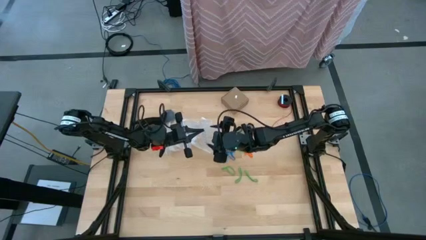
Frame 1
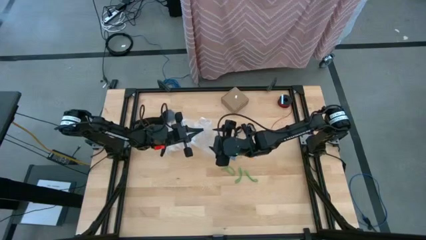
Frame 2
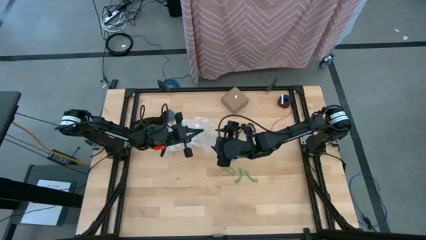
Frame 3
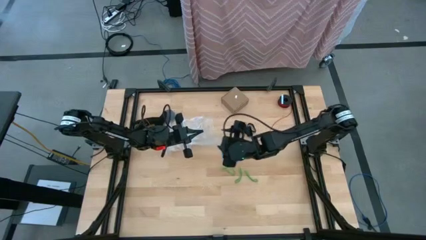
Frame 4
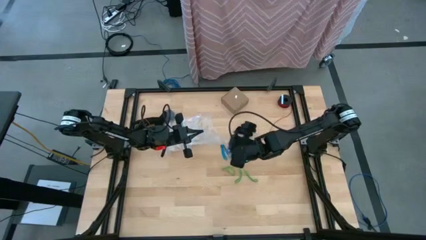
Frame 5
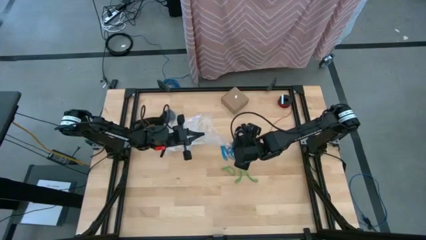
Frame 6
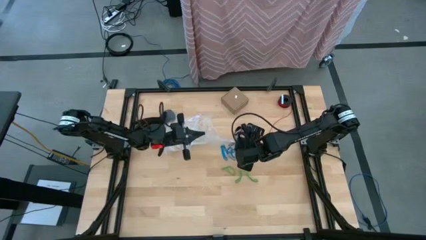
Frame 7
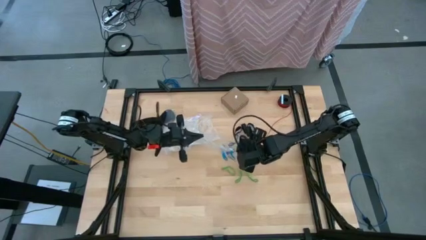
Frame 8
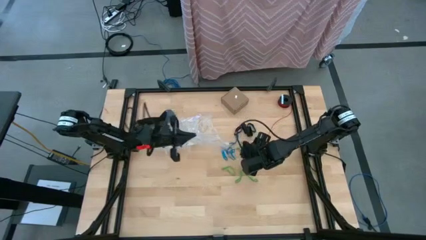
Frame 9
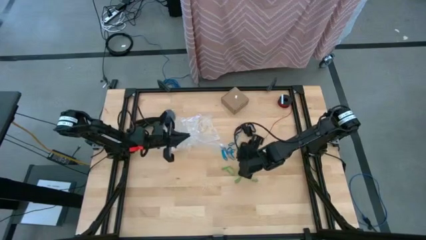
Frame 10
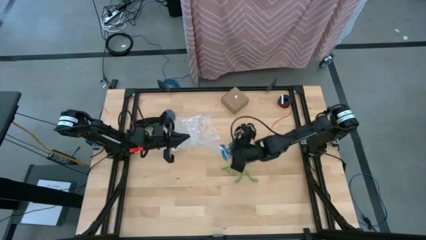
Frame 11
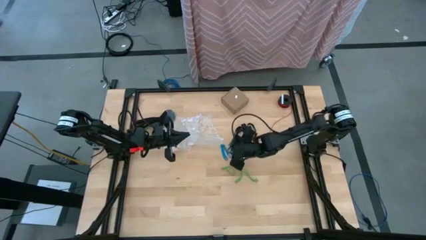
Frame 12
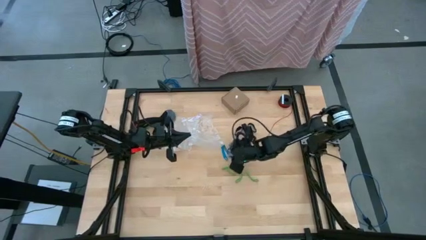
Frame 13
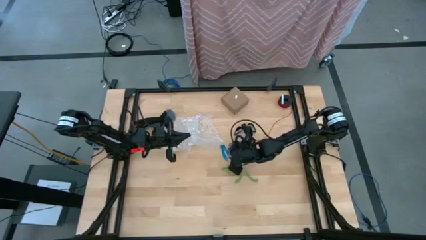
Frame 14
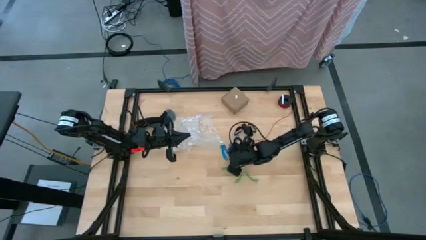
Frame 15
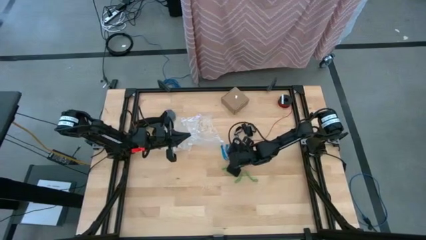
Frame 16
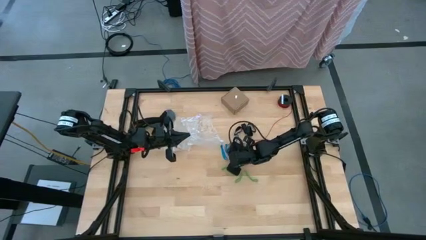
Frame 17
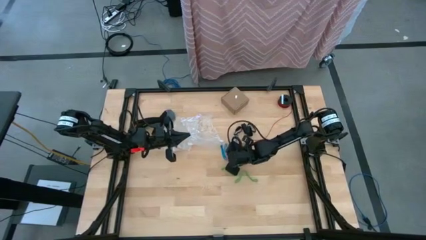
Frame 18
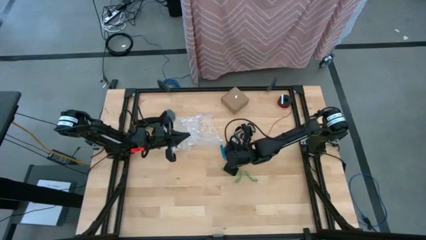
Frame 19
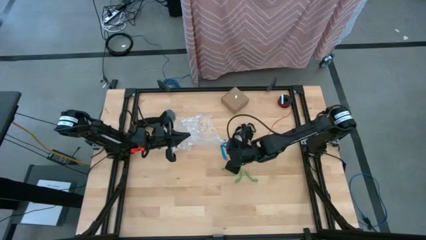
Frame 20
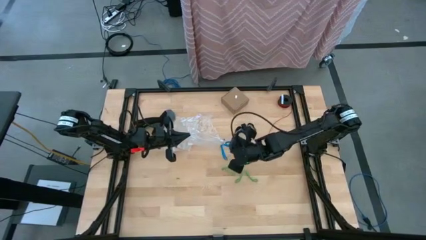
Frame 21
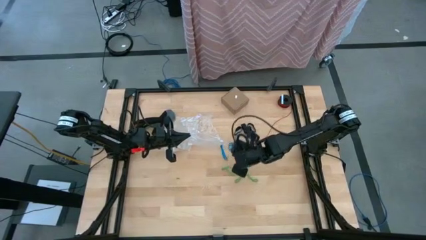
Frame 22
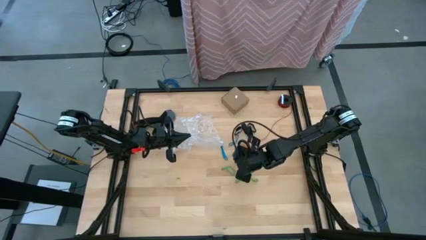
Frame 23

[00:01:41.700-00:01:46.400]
Task: Sort rubber bands
Put the blue rubber band into the transparent zip bag

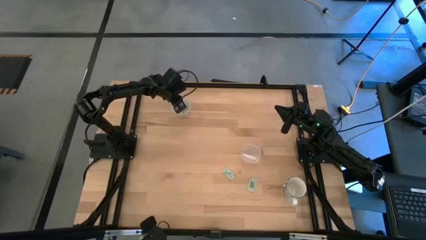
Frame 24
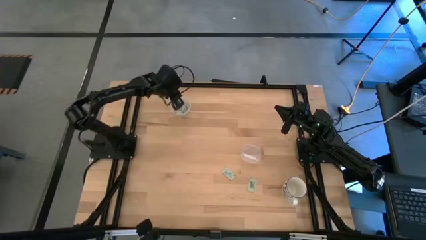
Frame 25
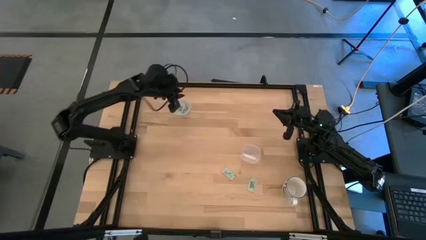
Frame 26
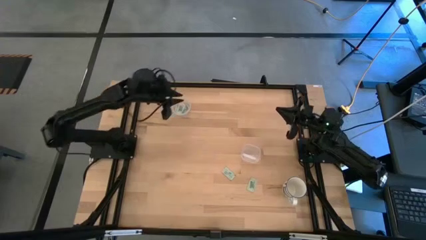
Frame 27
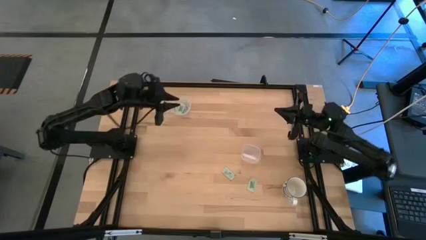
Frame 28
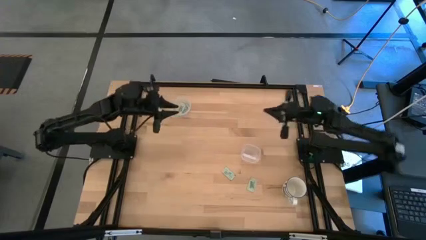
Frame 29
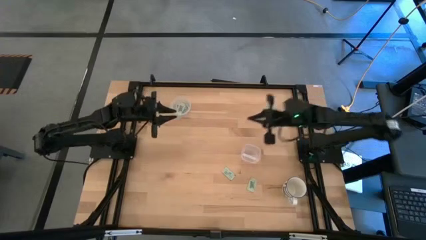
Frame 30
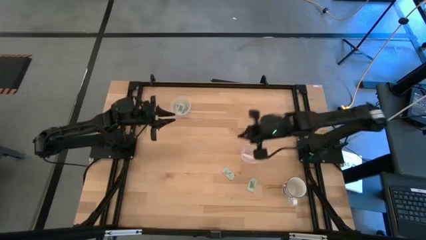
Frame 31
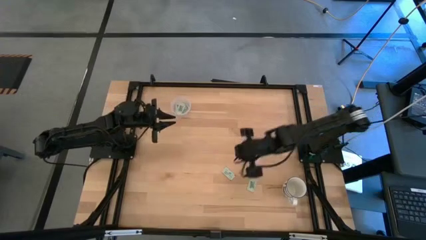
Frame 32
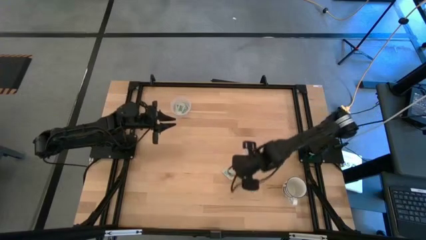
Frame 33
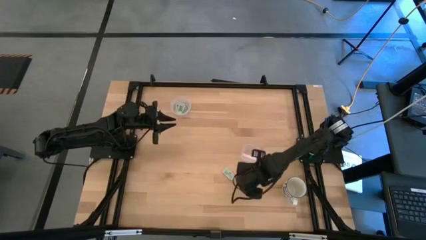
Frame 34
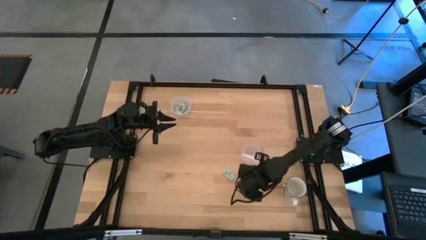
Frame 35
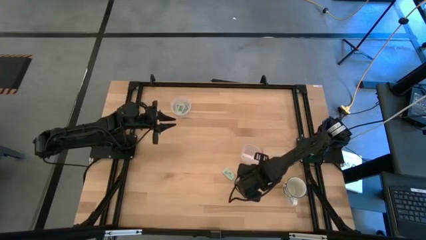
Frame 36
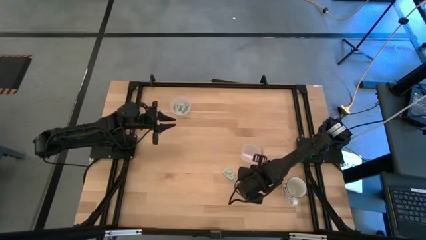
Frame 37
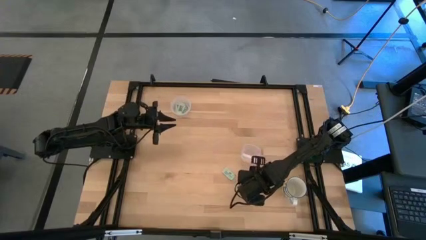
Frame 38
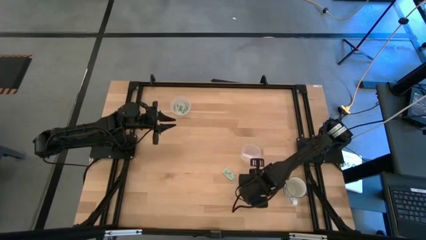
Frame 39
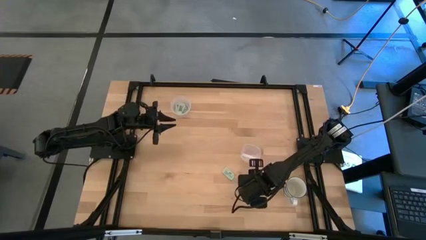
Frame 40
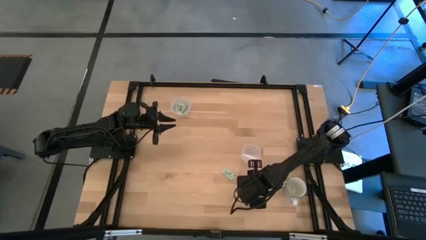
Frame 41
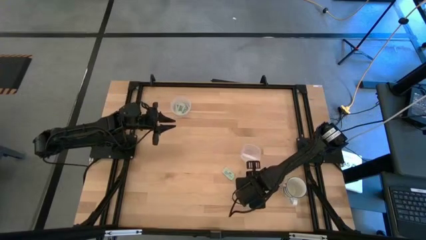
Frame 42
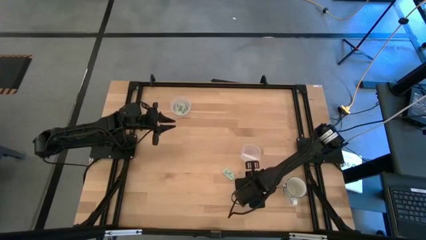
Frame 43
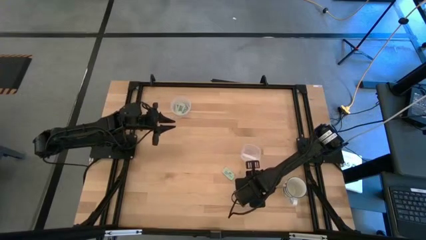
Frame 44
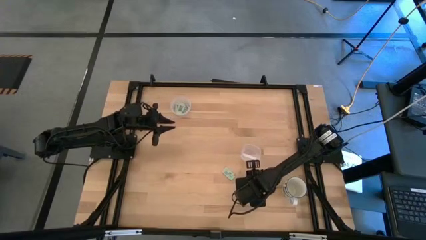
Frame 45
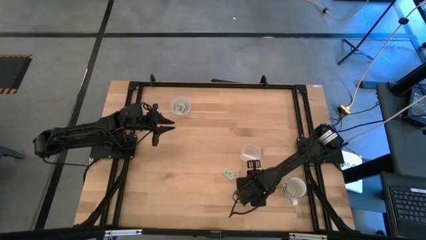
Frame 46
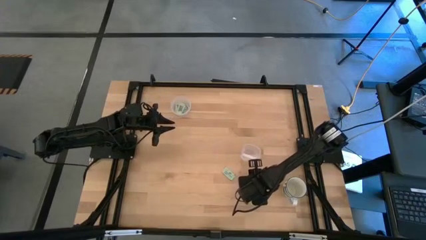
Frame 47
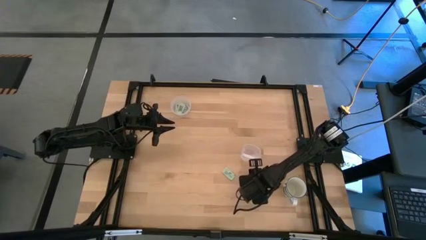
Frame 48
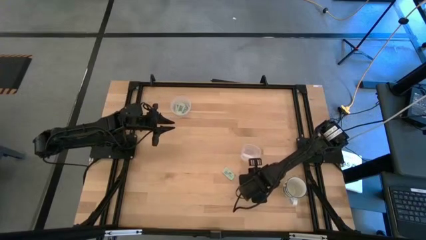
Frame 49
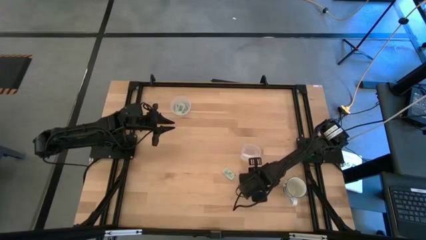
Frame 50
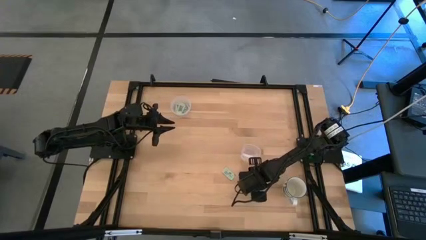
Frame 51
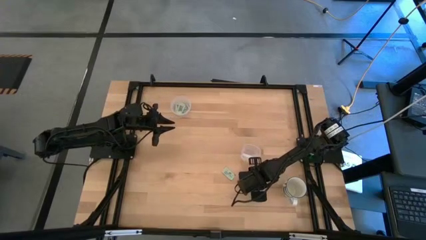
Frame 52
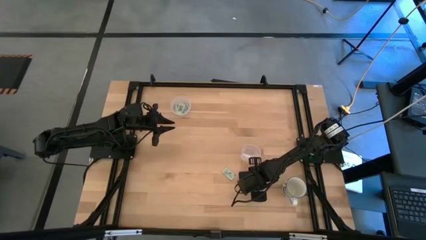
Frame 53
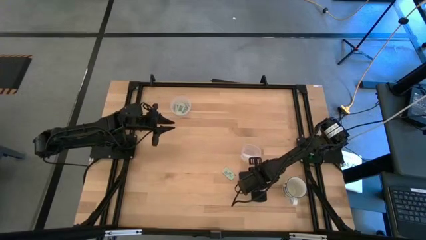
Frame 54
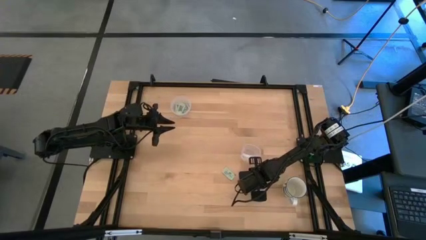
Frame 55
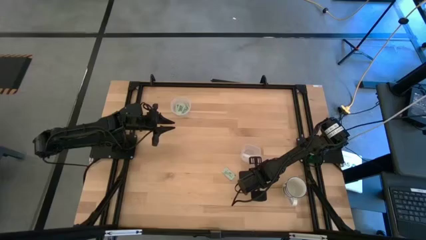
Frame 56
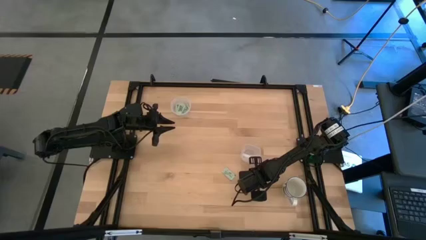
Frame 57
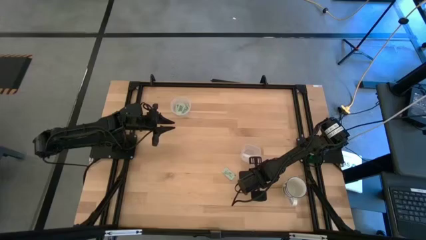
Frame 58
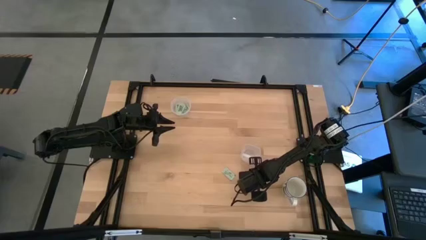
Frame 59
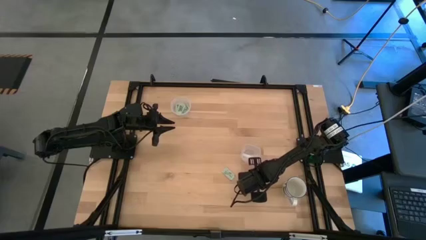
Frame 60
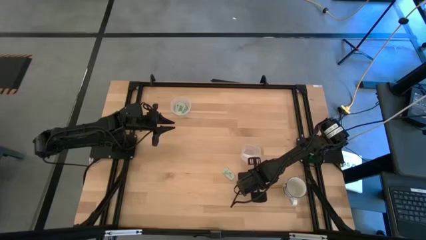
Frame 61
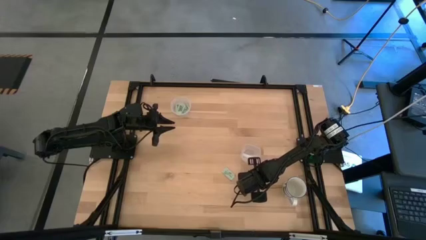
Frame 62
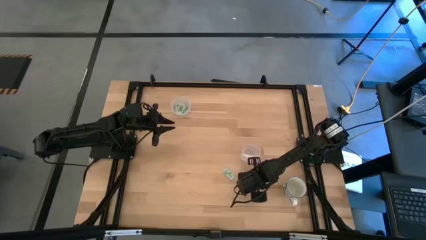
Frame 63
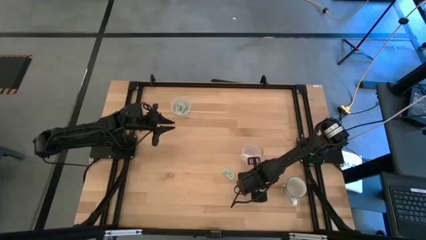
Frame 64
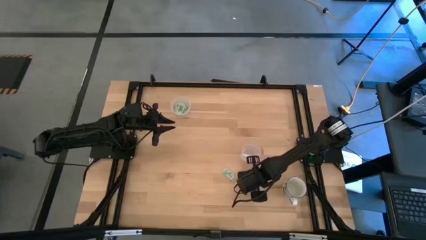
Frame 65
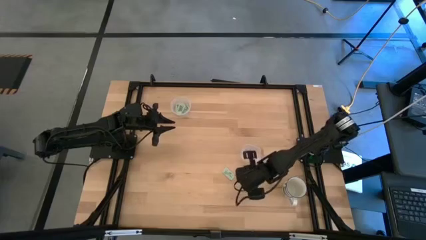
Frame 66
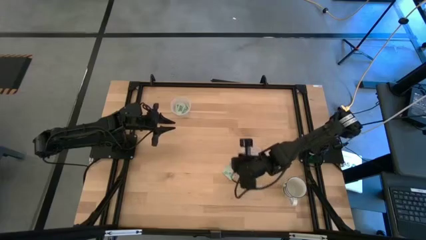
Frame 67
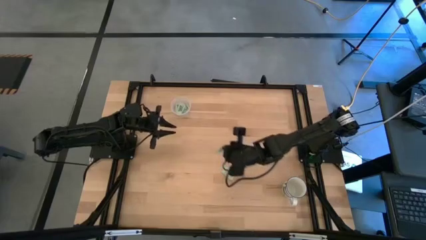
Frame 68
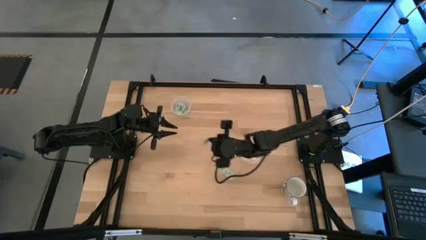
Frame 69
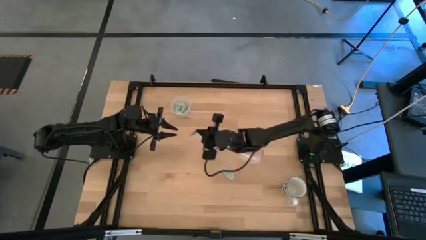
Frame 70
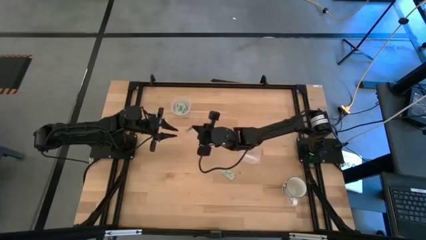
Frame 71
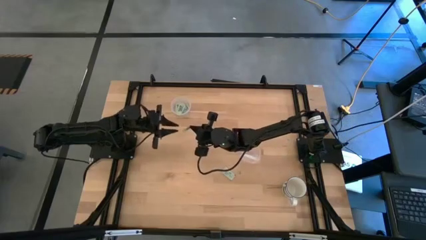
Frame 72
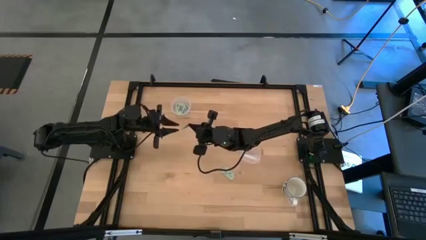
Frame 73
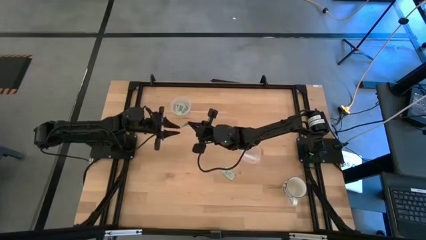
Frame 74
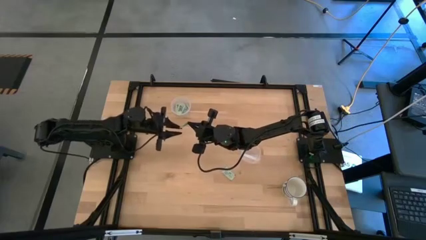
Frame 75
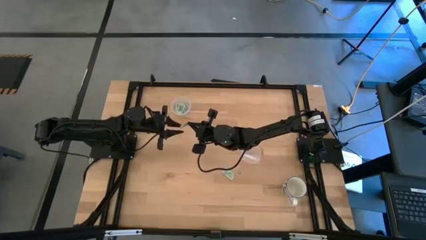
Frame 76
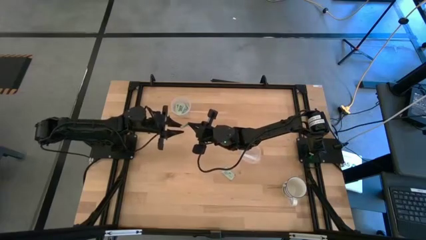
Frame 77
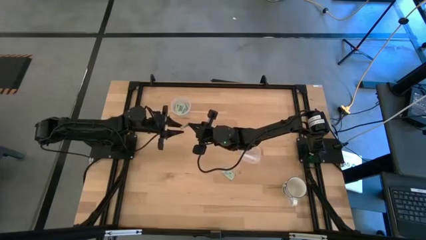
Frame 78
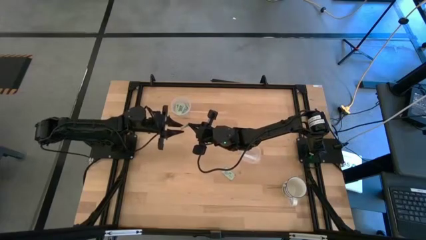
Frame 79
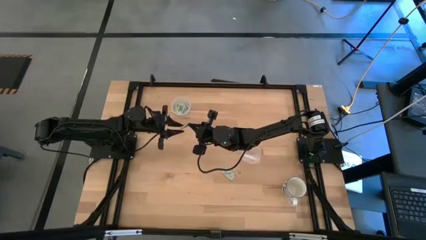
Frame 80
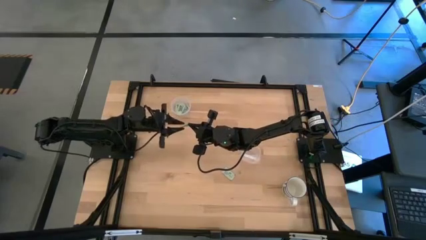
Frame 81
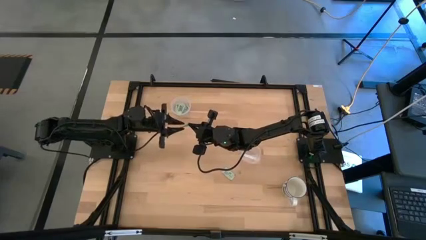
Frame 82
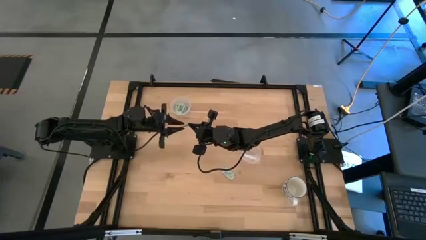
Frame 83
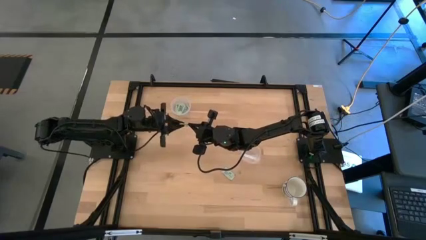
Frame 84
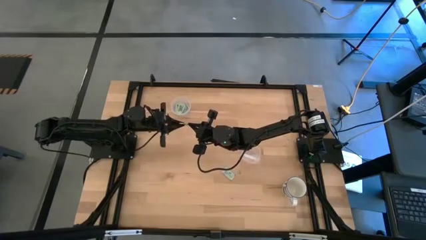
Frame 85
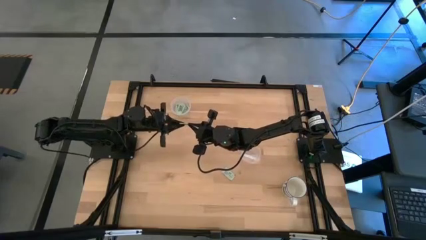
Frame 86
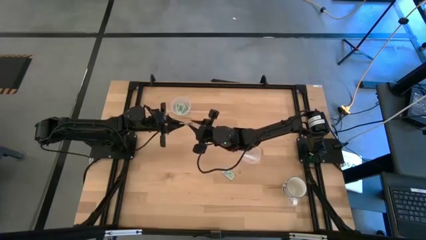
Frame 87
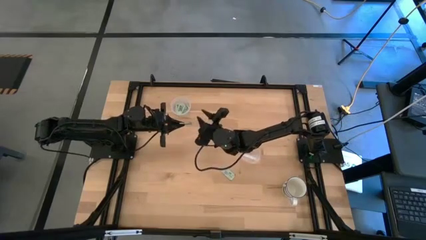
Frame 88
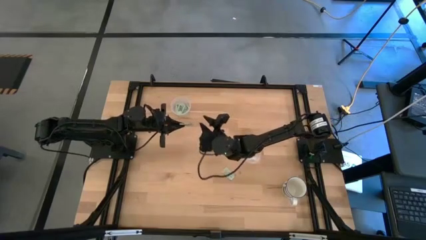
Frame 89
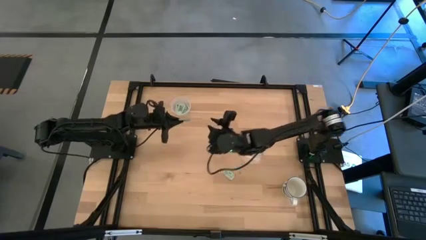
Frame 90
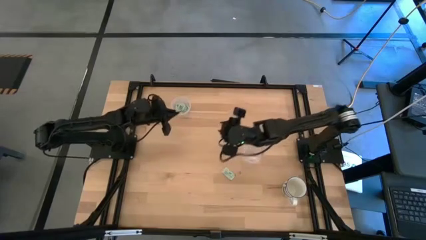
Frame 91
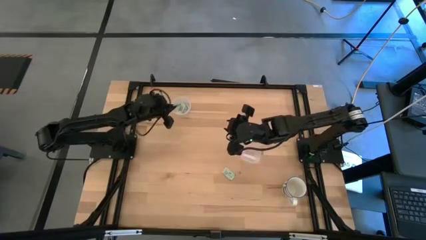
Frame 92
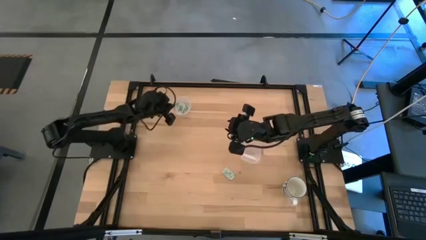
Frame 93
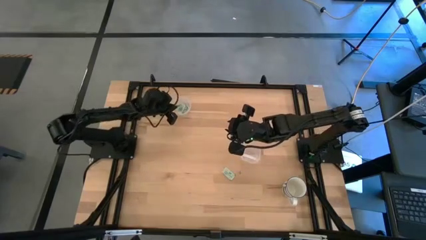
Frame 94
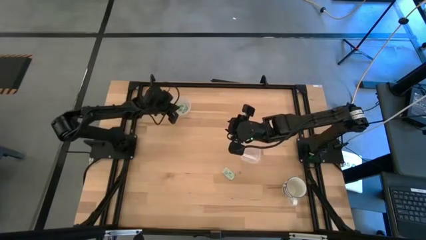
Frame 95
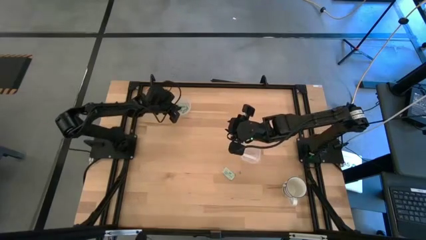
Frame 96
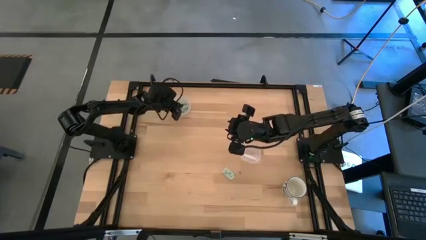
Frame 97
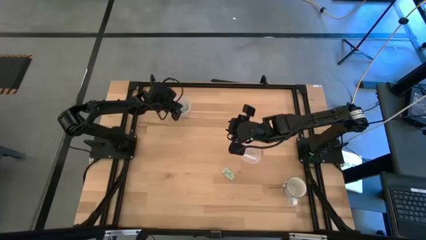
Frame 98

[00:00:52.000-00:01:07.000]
Task: Pick and place Stevia / Truvia into bins
Put the stevia packet into the top transparent container
